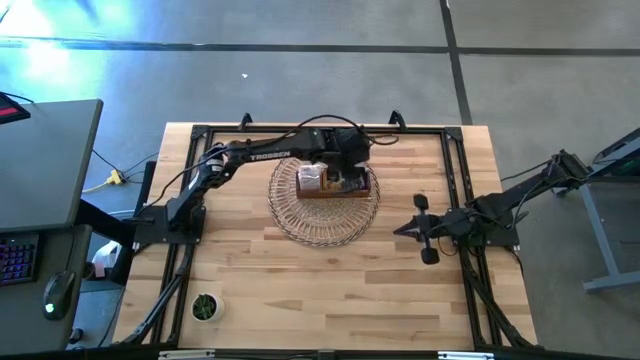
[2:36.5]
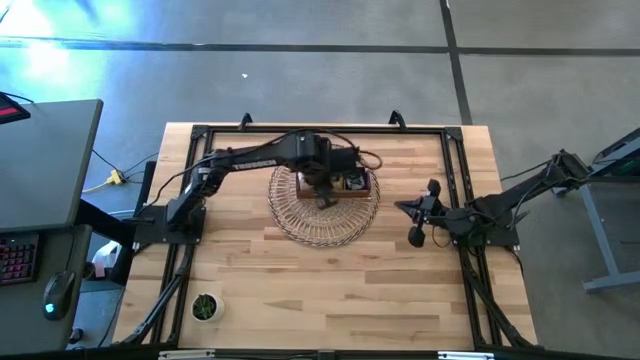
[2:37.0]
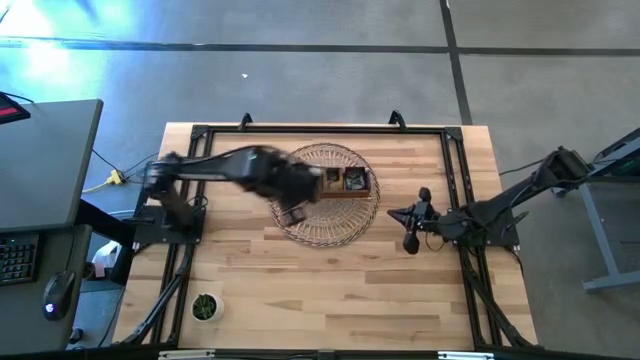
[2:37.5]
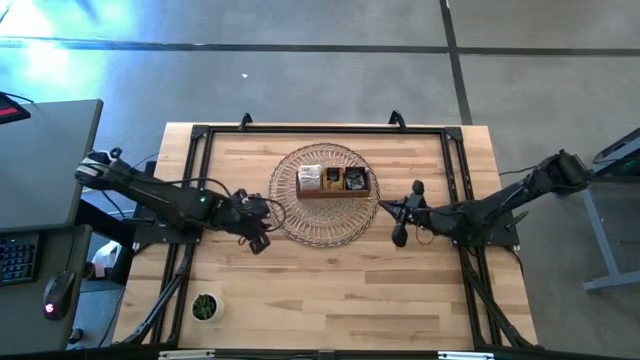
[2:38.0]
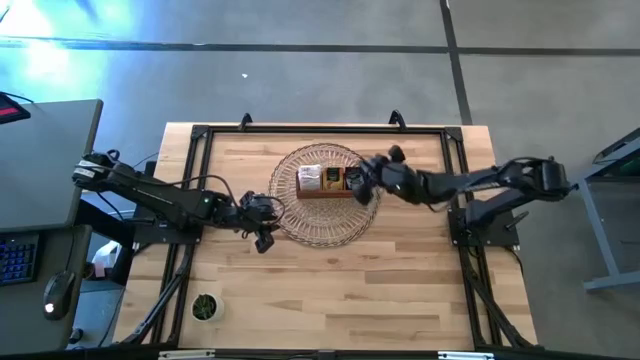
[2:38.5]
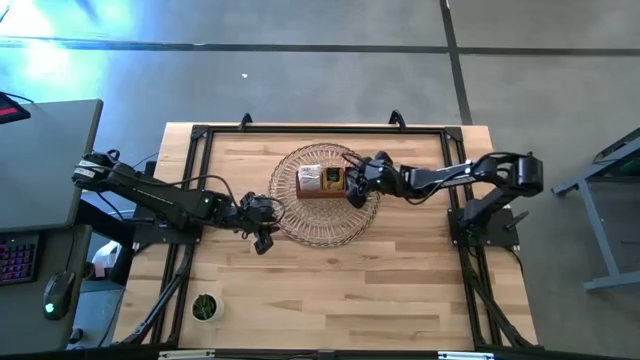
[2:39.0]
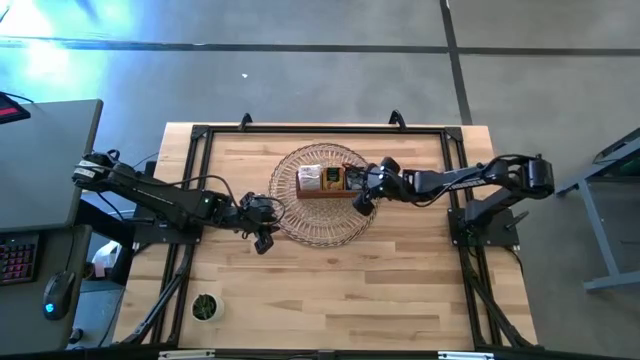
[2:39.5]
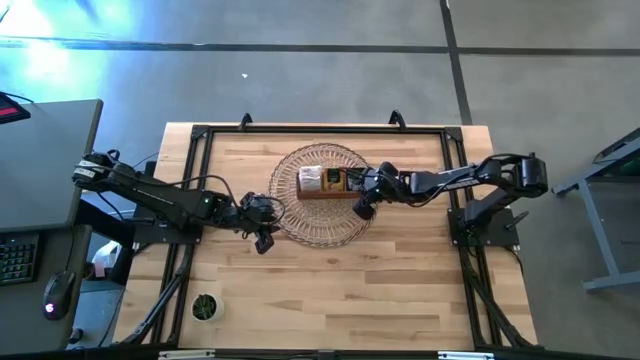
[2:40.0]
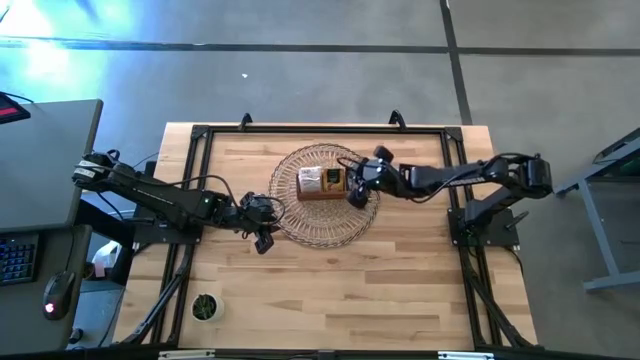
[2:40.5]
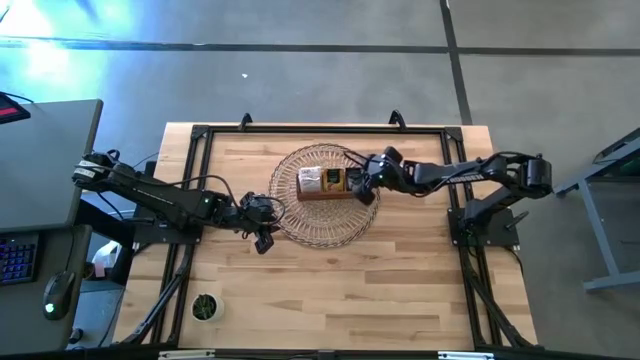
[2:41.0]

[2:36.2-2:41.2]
Task: Pick & Place Tea
Adjust the purple tea bag in the right section of the wooden organizer

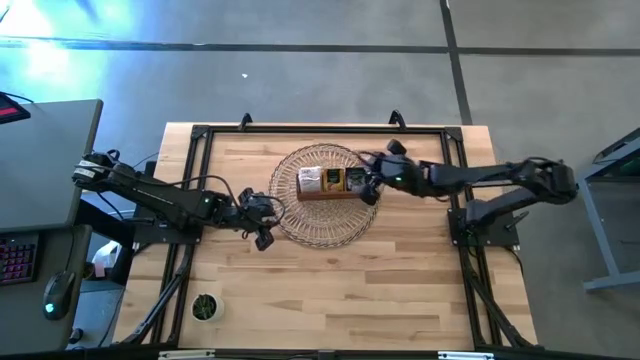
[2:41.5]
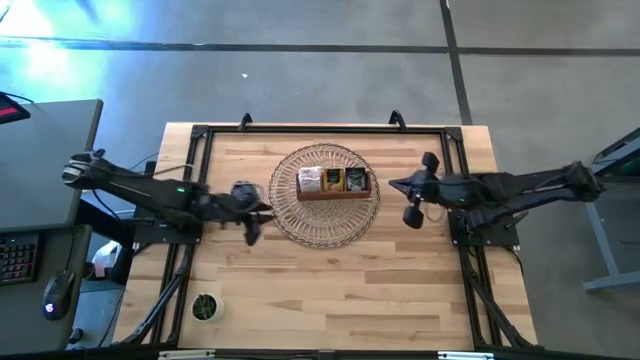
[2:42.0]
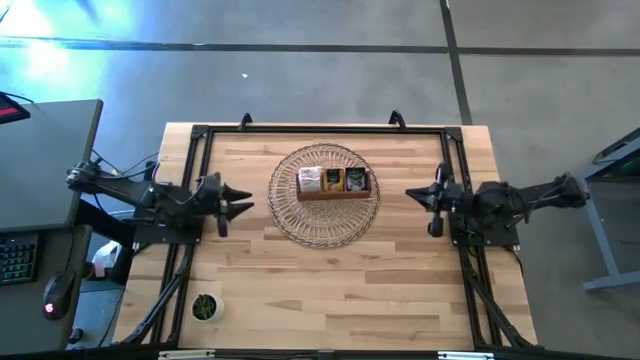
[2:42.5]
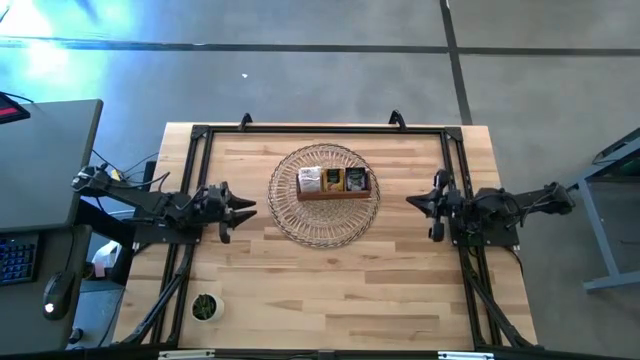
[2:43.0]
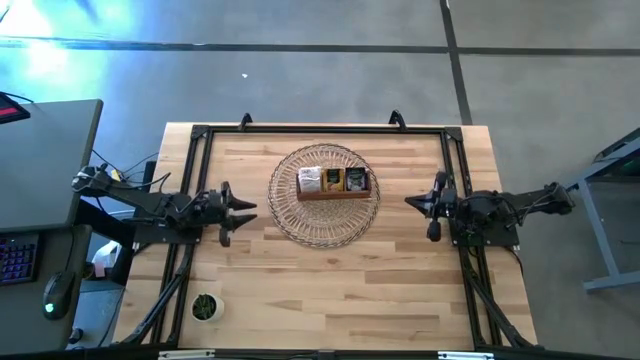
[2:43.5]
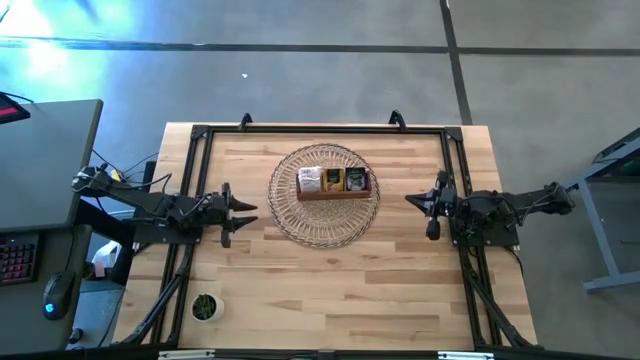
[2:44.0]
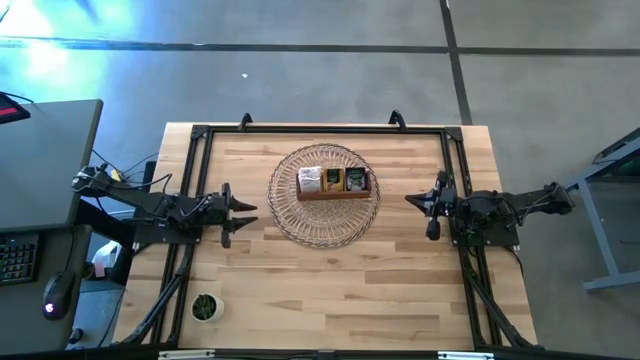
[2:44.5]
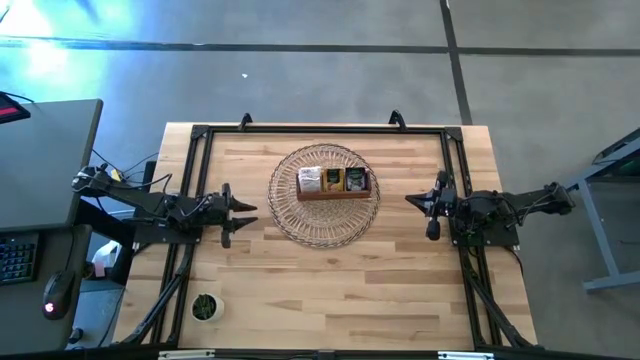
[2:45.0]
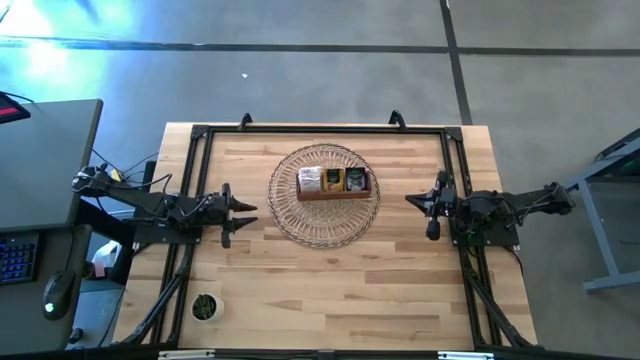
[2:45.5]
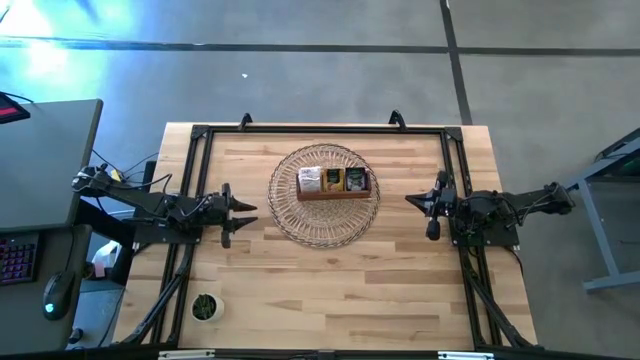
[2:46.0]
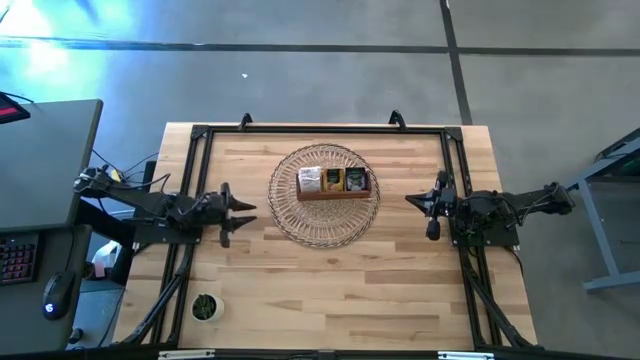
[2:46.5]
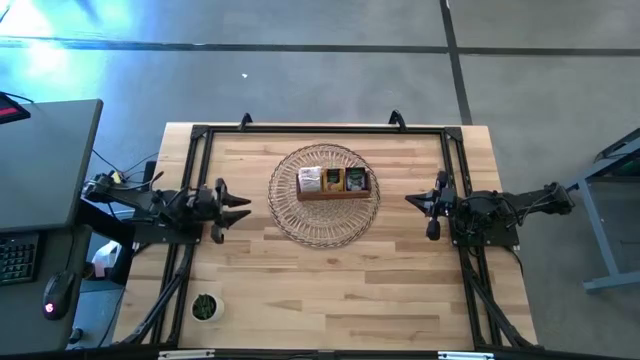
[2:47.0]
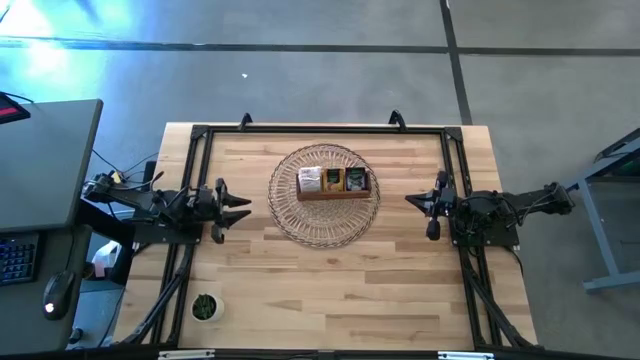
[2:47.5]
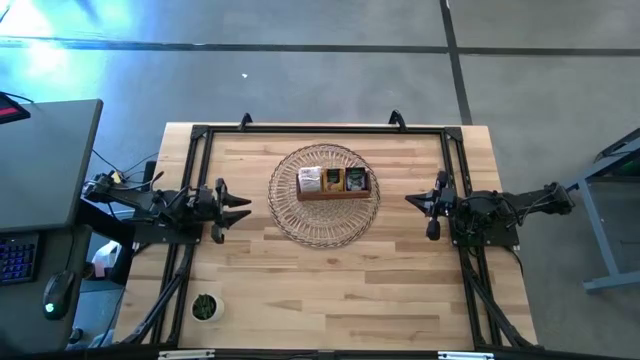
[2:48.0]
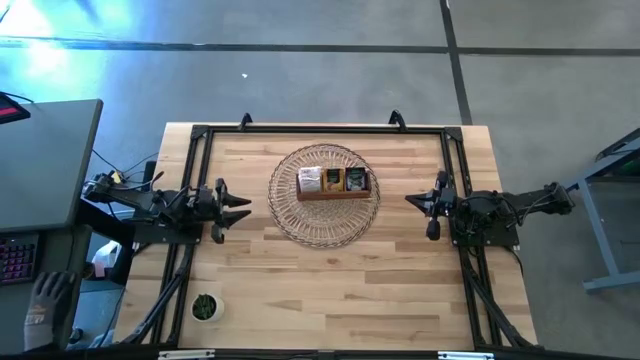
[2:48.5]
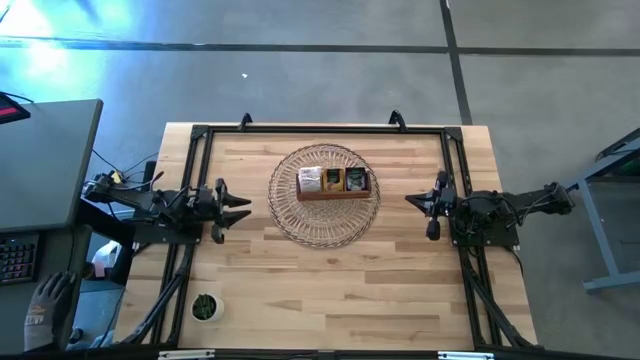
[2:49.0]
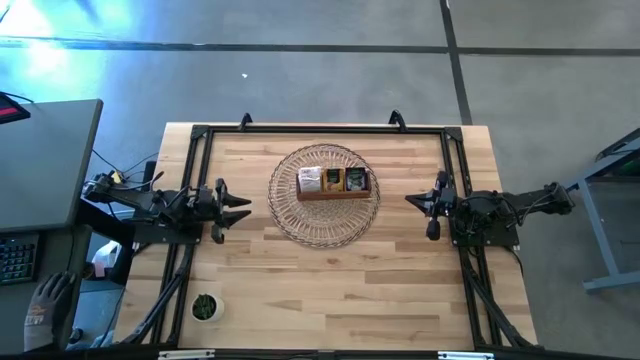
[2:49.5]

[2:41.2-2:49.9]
Return to Home Position

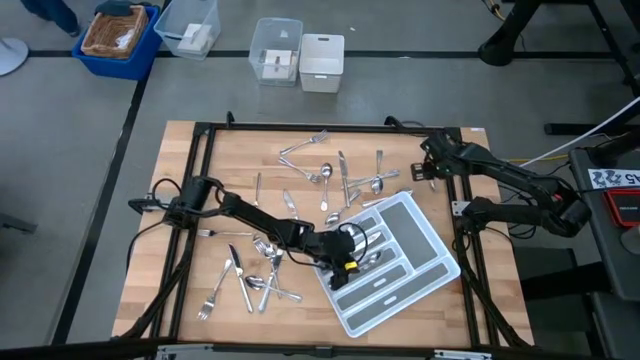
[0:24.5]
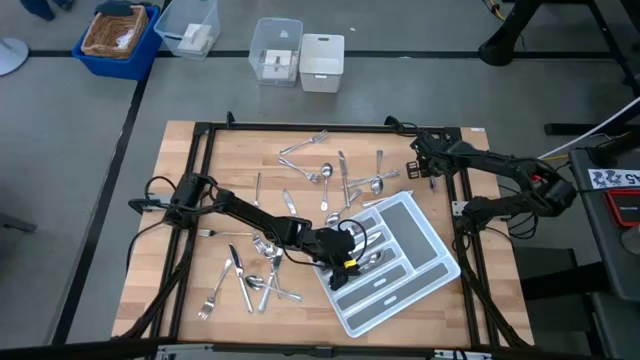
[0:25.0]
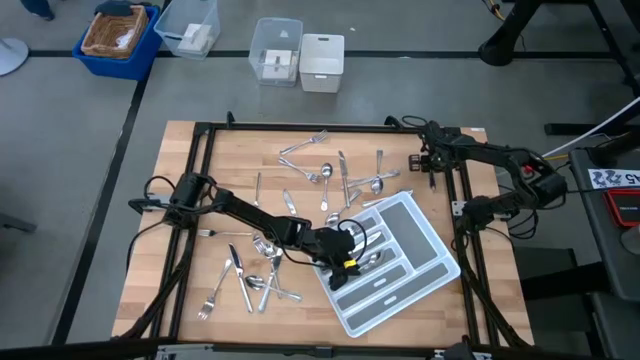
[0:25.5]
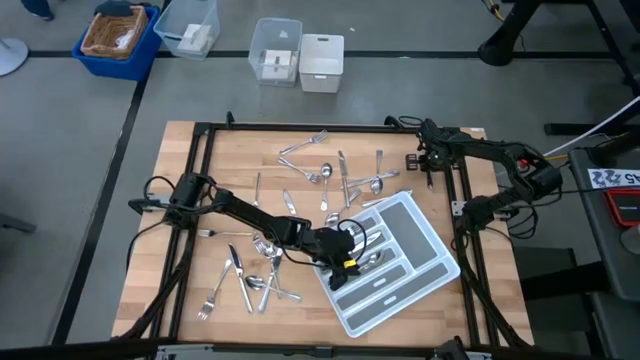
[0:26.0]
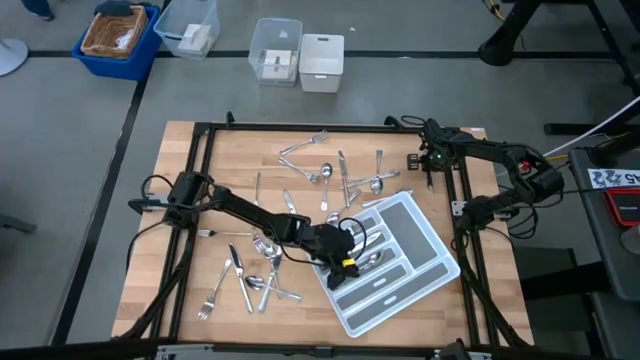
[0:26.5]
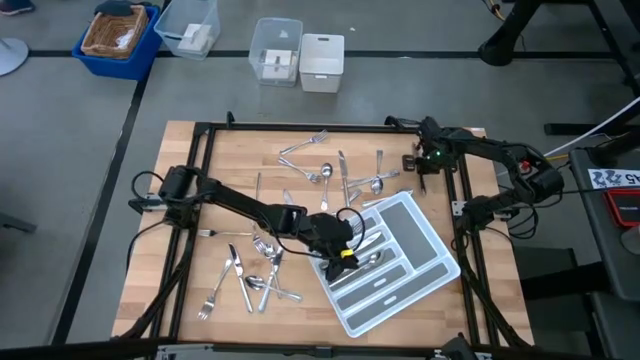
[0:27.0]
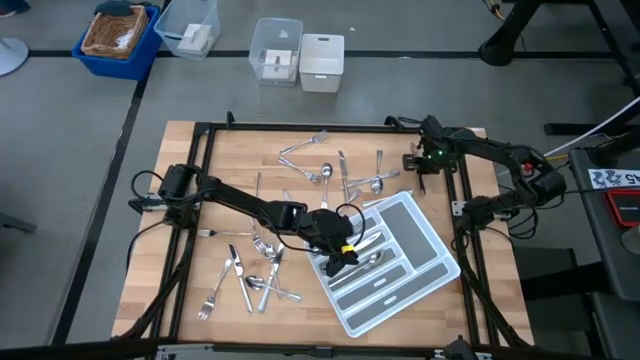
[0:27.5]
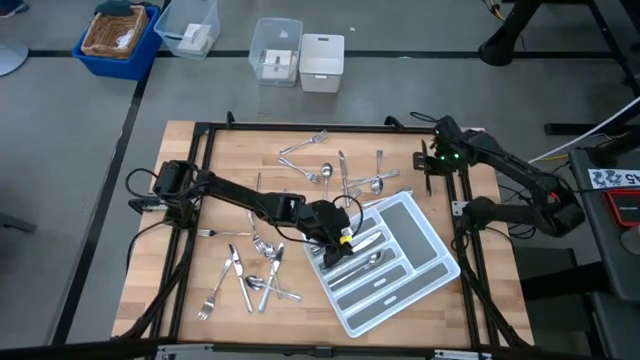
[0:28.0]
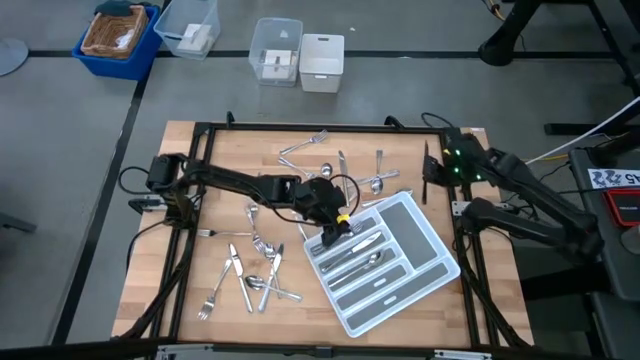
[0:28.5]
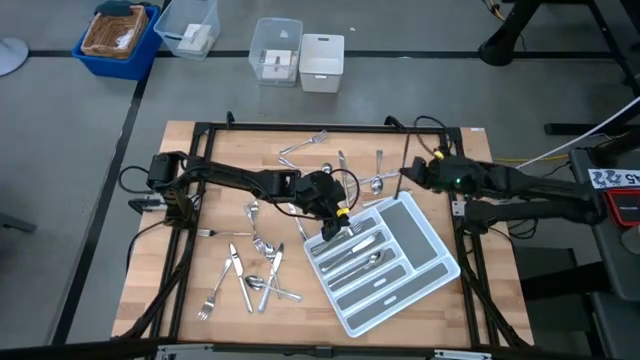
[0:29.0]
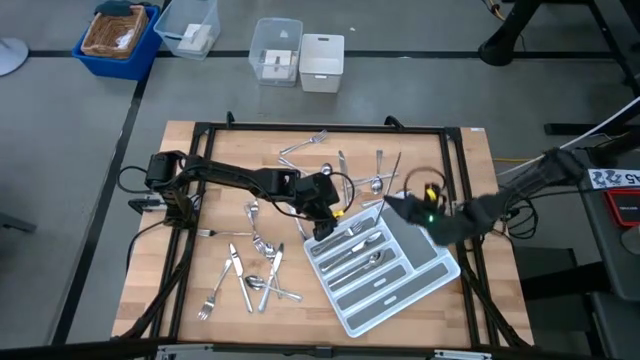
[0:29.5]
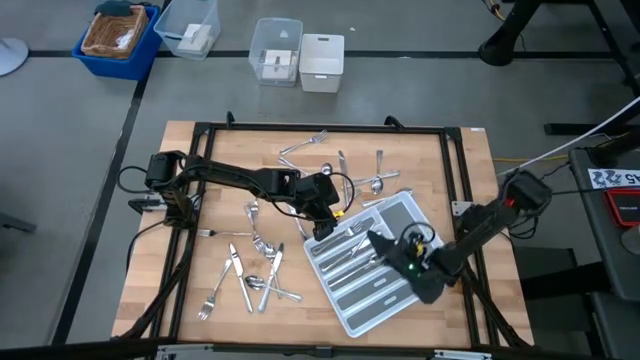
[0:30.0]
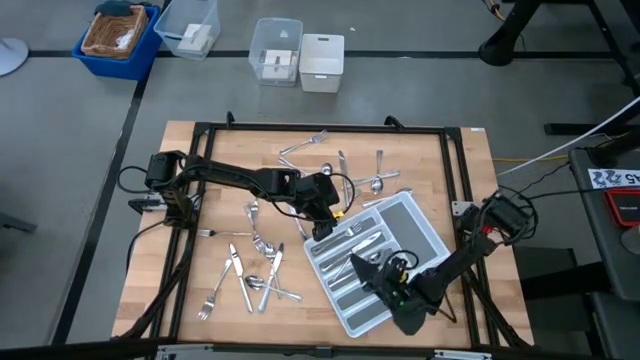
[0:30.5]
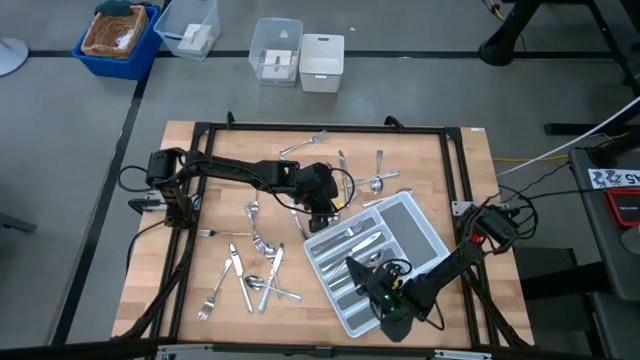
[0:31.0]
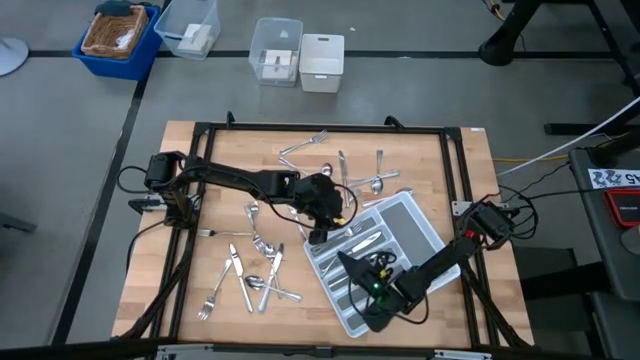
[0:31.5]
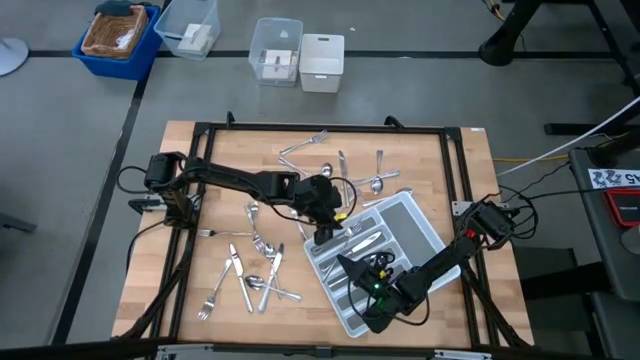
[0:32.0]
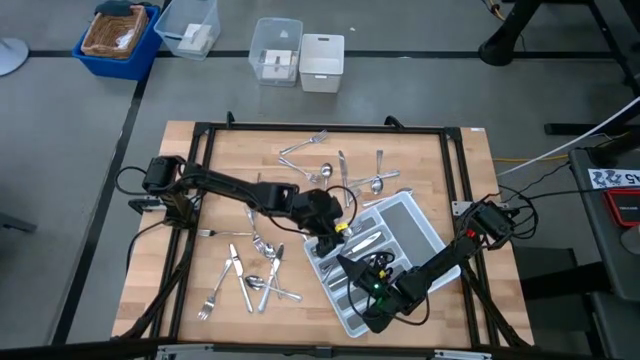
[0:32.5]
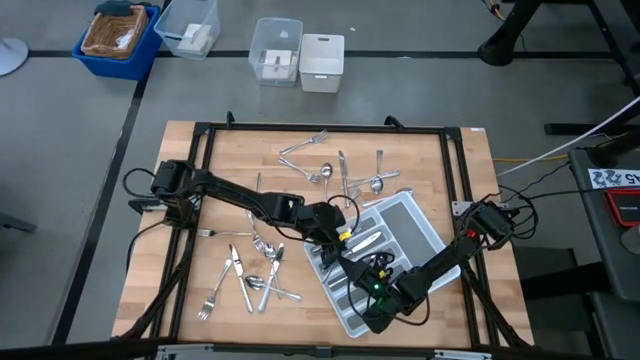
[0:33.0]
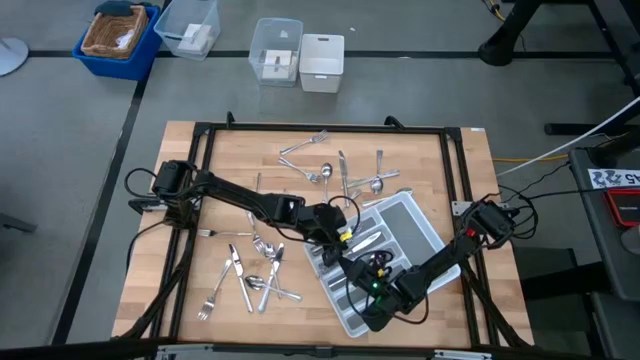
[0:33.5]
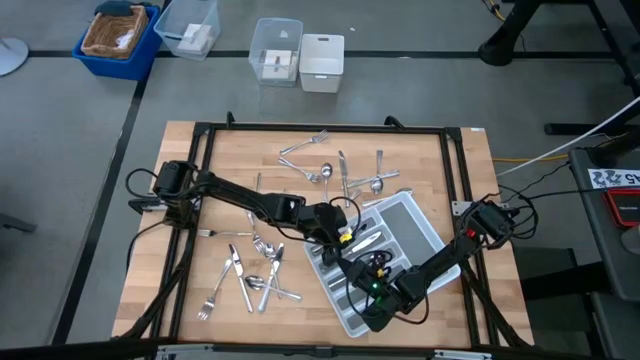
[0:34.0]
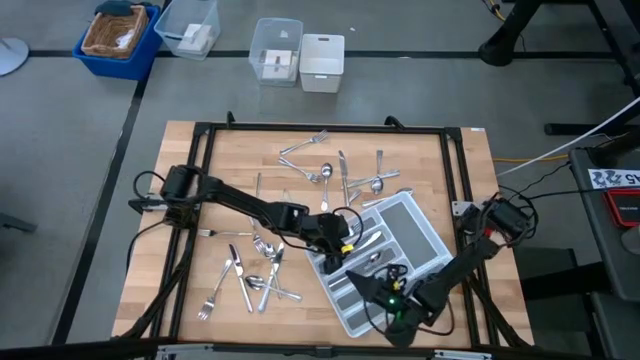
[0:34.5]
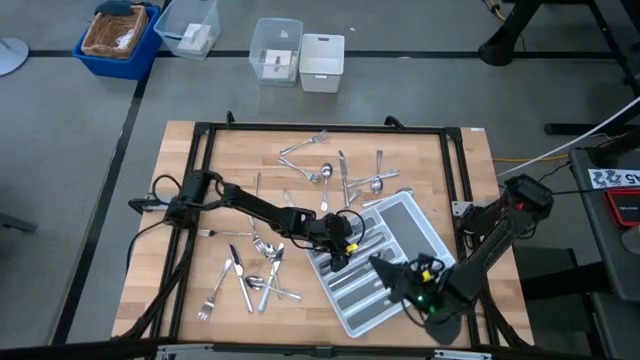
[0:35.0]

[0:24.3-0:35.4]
Task: Sort silverware
Put the silver table knife into the silverware tray
